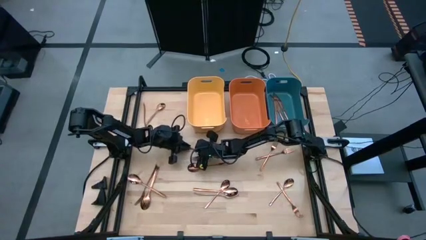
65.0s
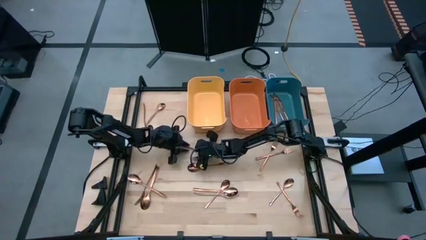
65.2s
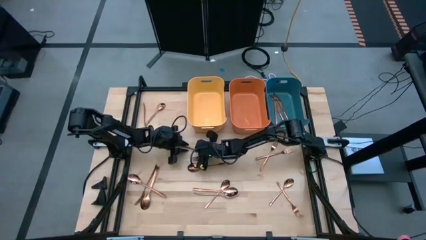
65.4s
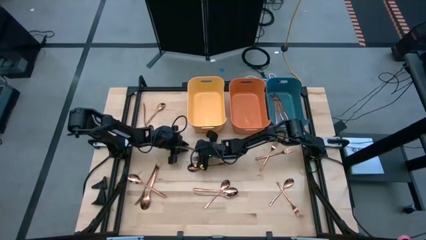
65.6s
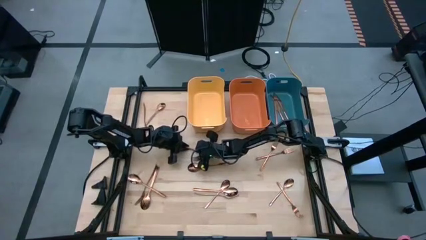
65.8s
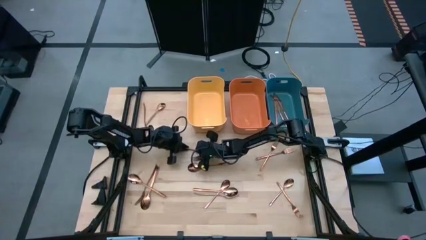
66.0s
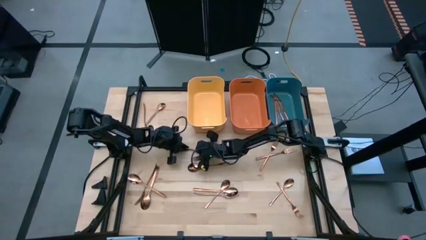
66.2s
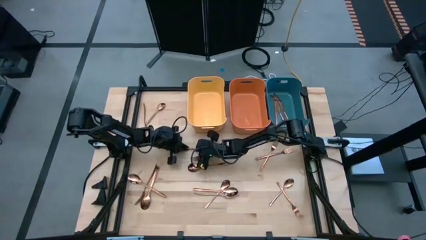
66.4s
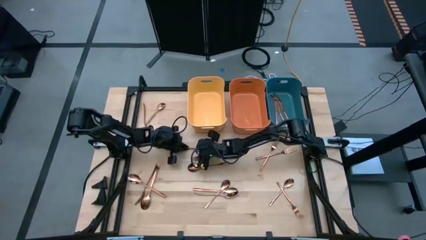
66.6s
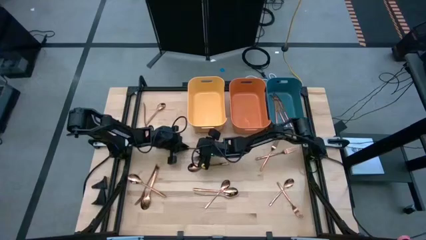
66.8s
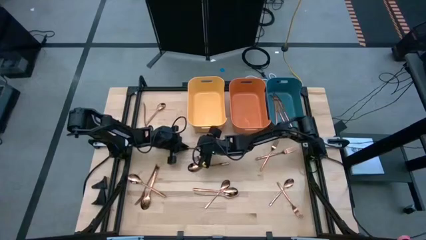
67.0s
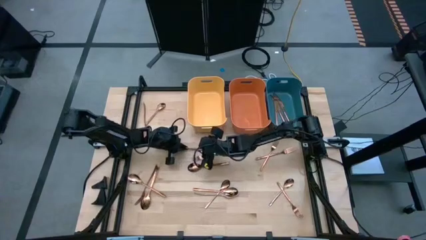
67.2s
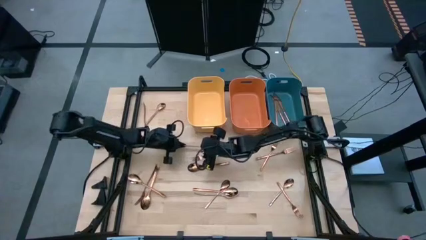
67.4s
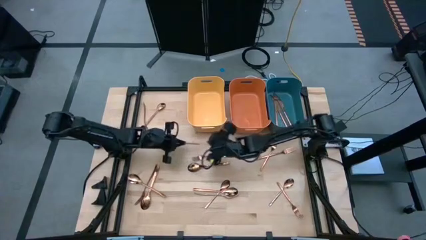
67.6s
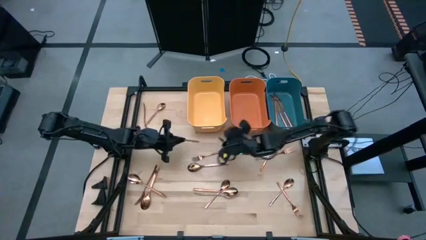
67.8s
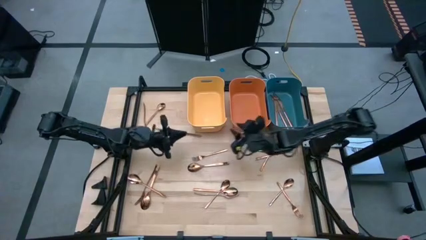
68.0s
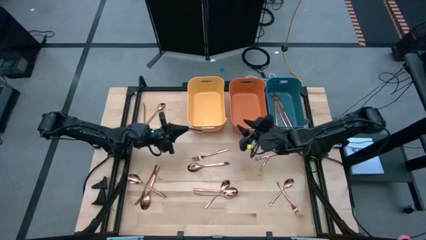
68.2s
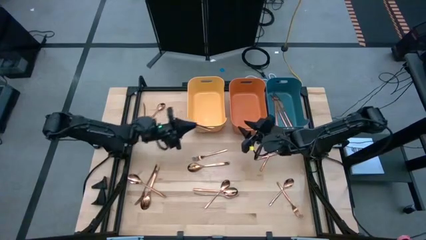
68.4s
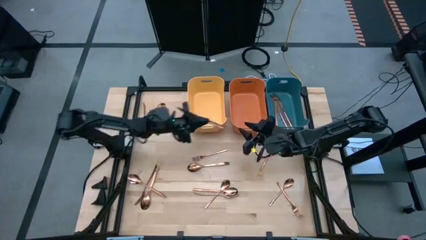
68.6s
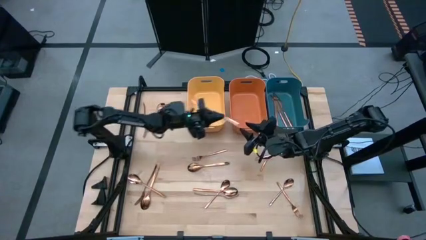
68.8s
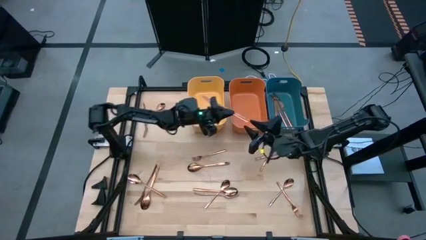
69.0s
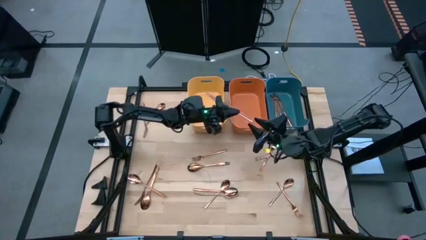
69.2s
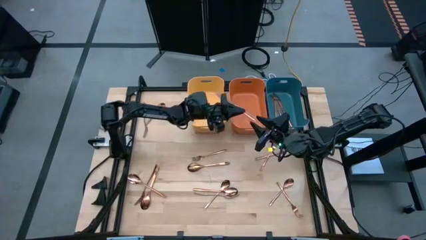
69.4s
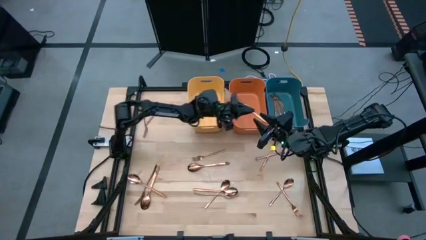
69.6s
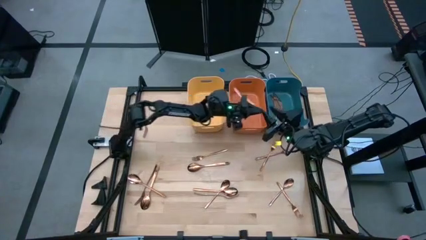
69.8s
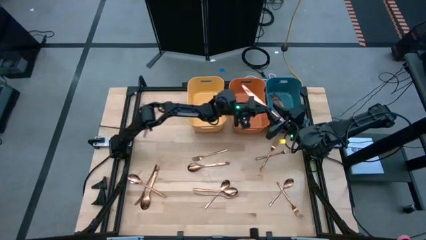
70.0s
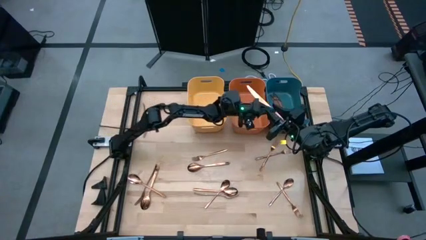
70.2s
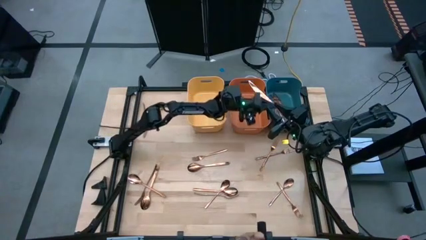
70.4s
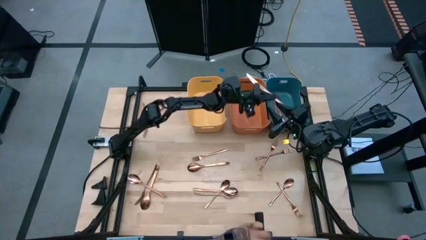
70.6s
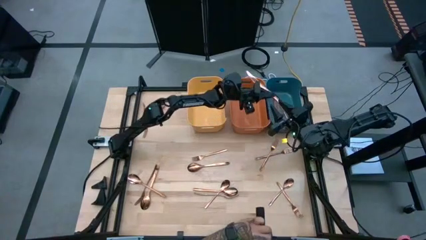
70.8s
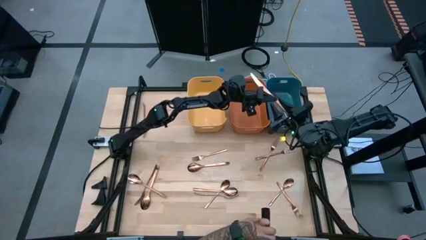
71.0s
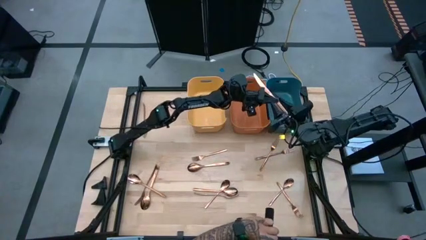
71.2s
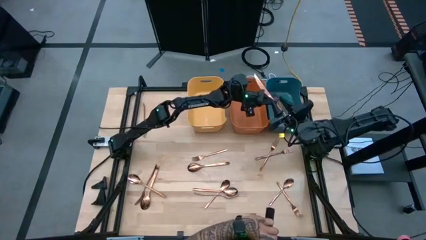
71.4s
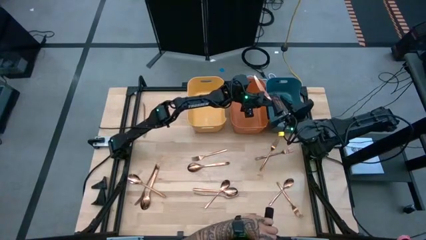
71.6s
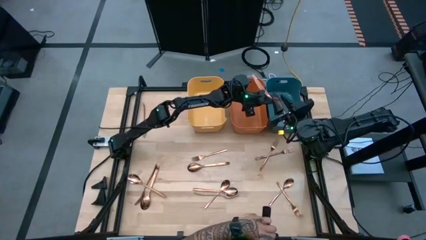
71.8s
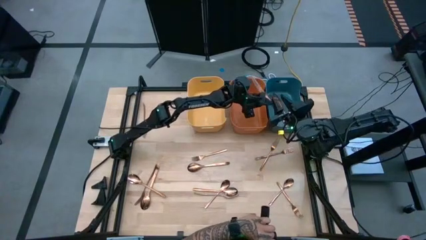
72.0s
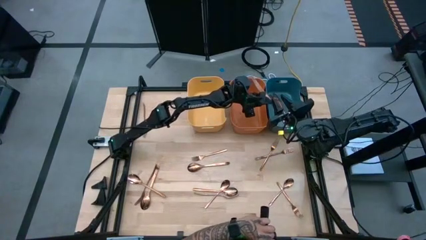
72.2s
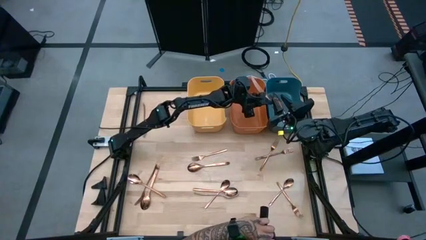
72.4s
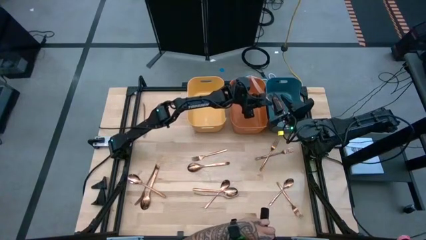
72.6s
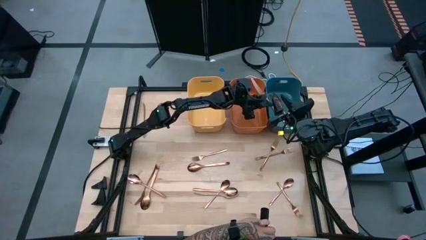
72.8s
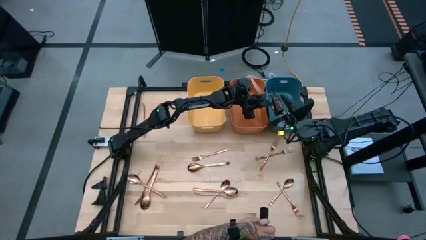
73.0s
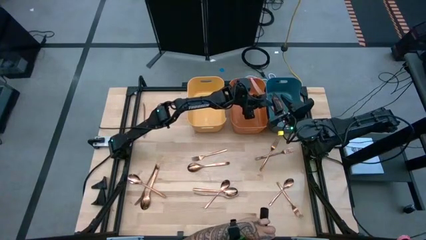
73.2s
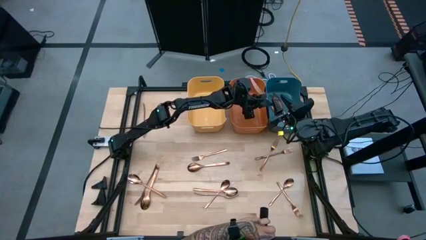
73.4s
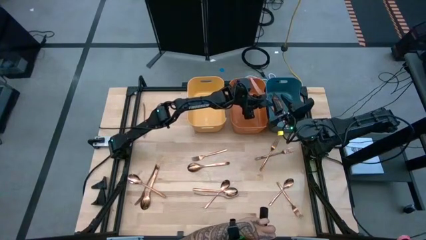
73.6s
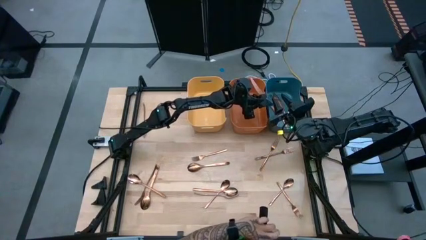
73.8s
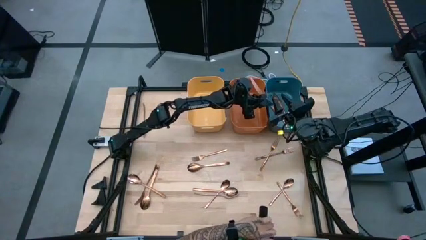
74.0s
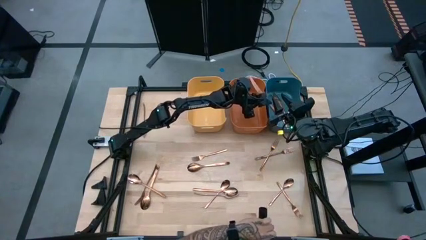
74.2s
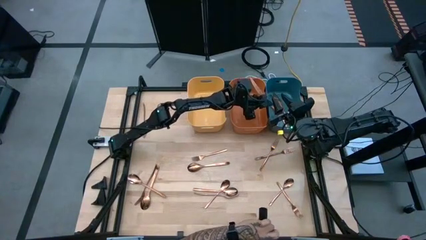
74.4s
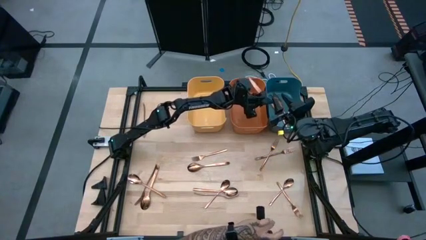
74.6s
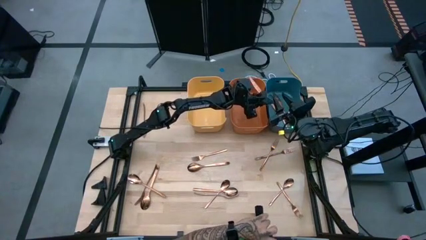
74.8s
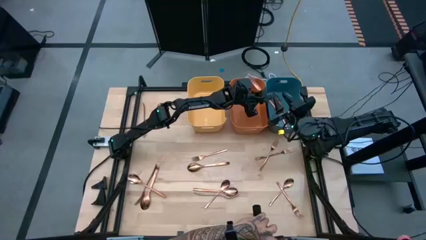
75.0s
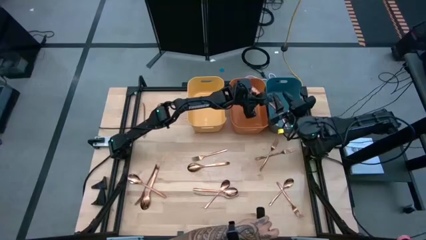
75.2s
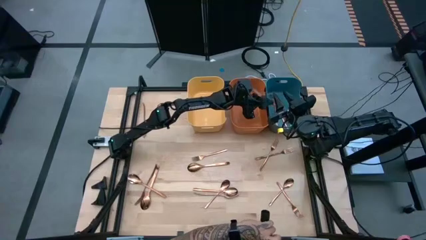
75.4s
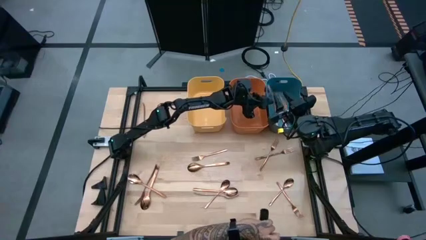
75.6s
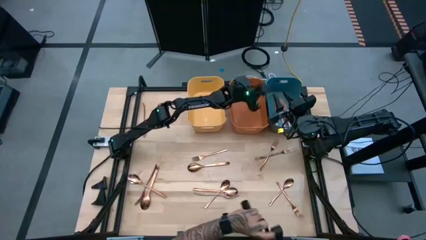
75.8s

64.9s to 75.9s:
Task: Sort silverware
Put the copper knife into the blue bin

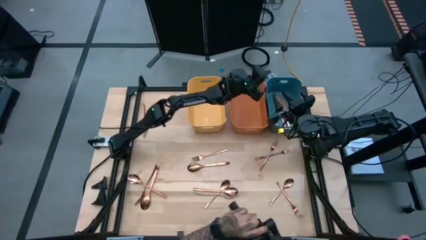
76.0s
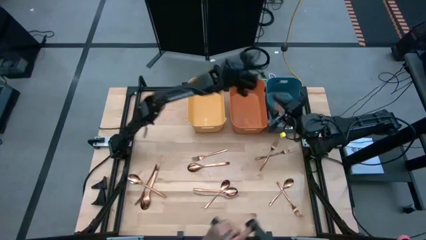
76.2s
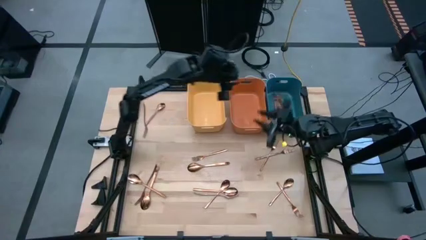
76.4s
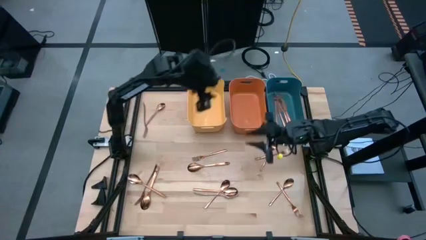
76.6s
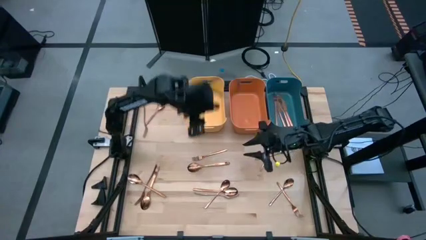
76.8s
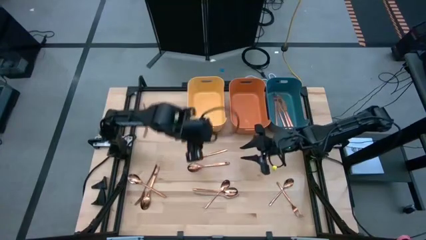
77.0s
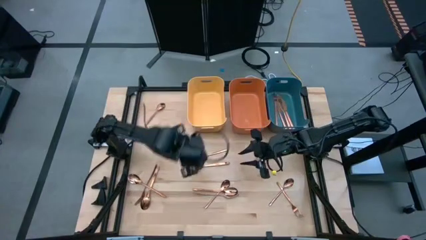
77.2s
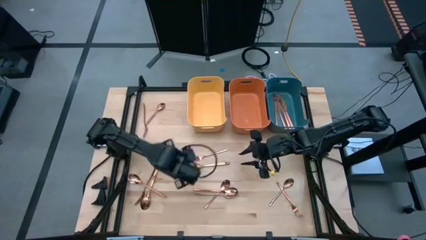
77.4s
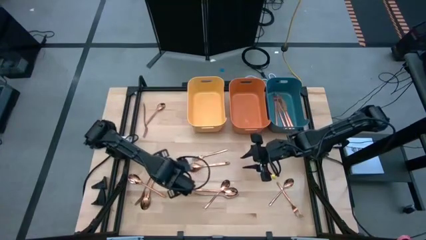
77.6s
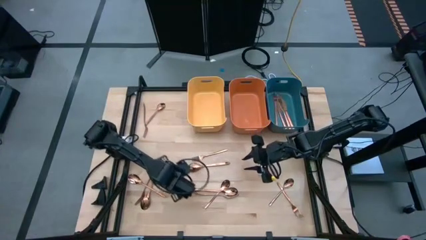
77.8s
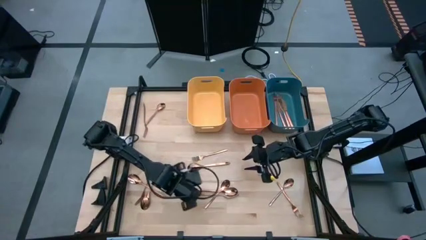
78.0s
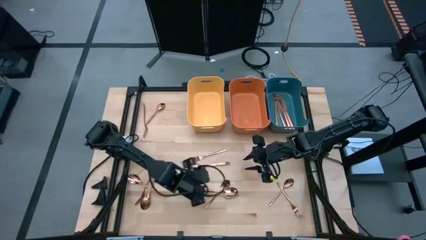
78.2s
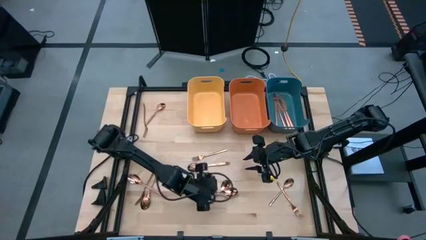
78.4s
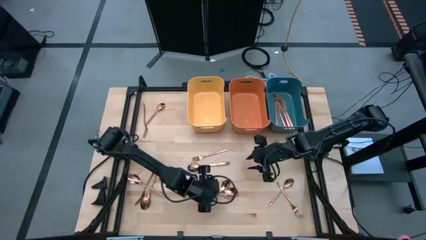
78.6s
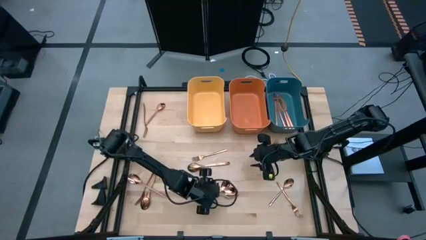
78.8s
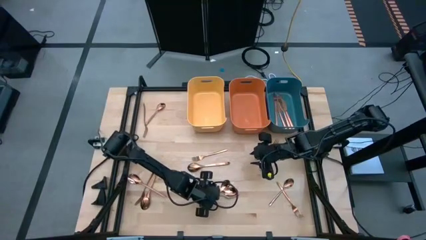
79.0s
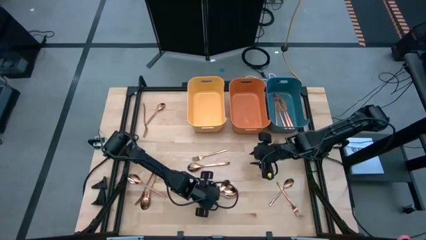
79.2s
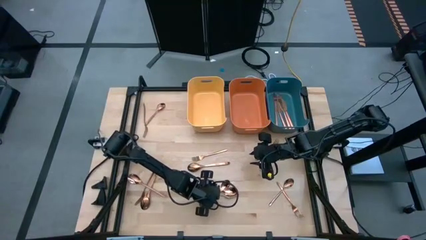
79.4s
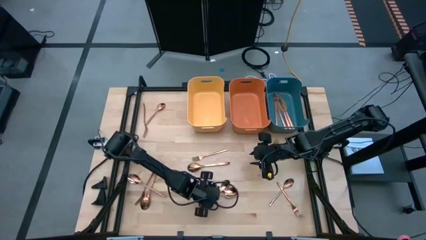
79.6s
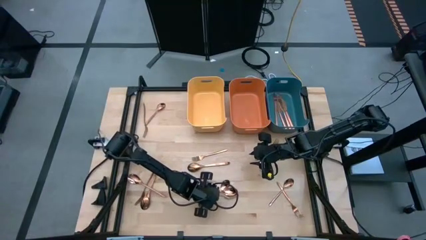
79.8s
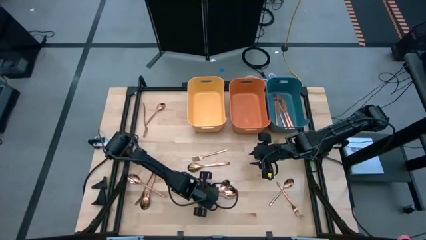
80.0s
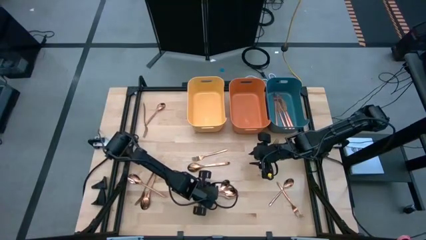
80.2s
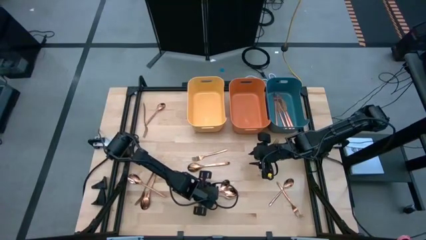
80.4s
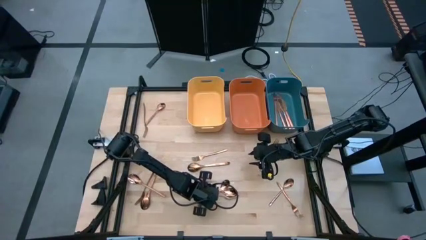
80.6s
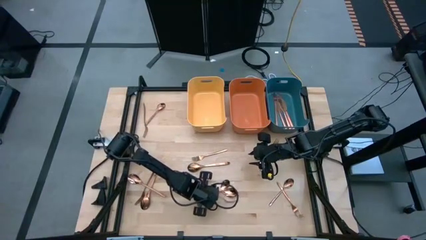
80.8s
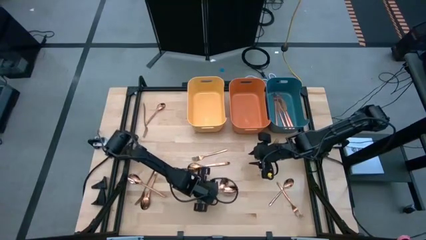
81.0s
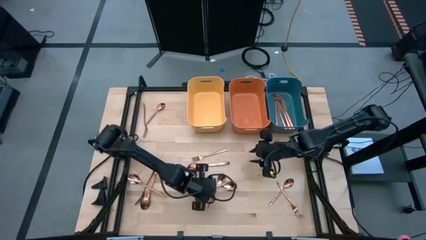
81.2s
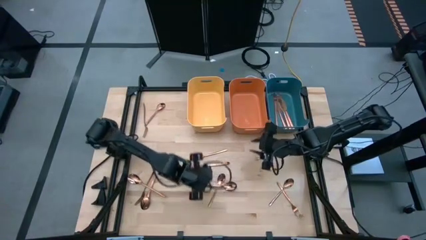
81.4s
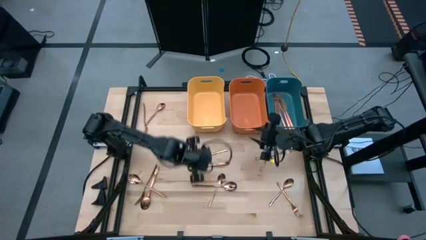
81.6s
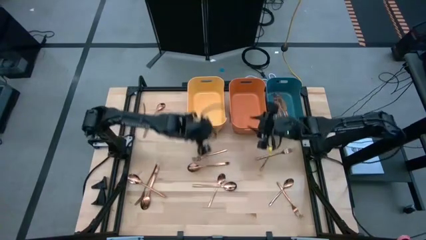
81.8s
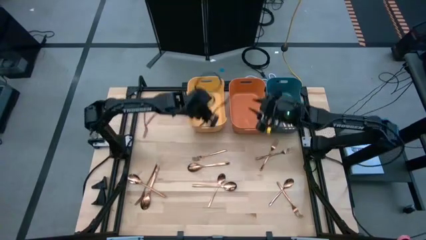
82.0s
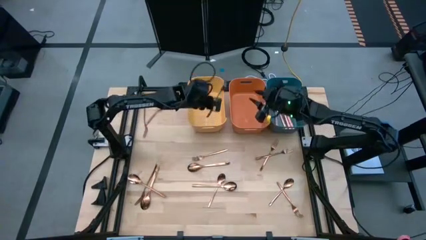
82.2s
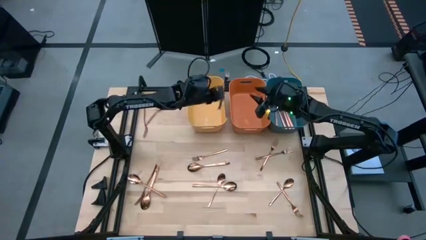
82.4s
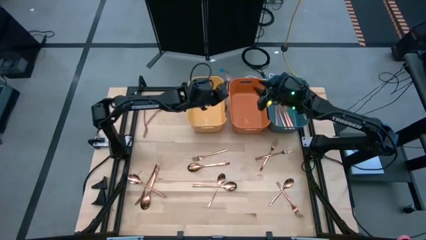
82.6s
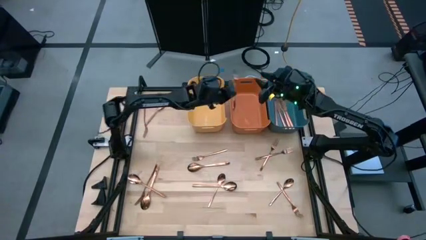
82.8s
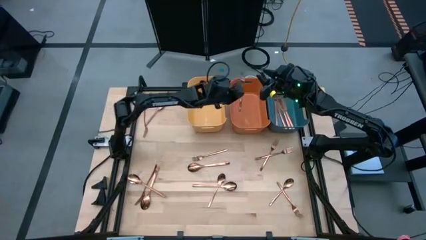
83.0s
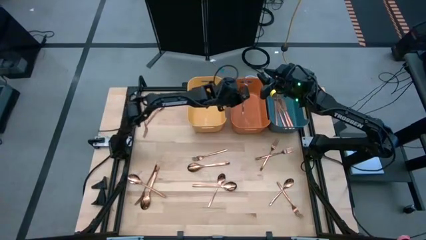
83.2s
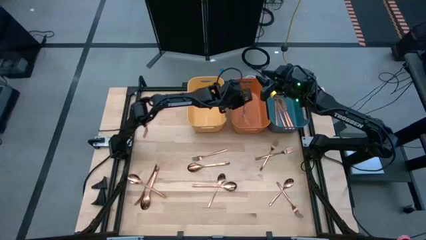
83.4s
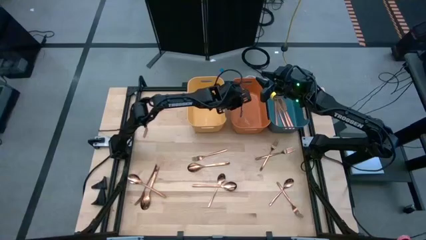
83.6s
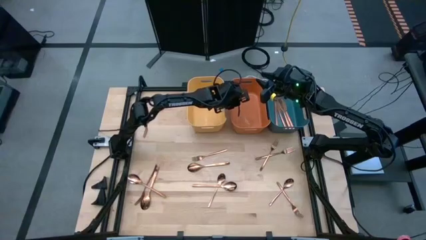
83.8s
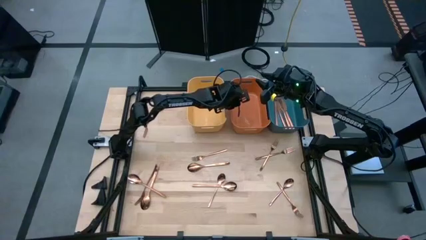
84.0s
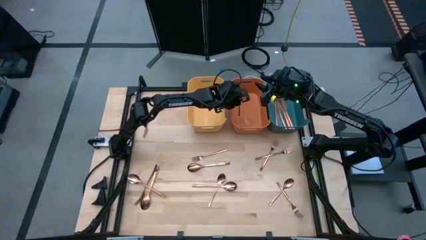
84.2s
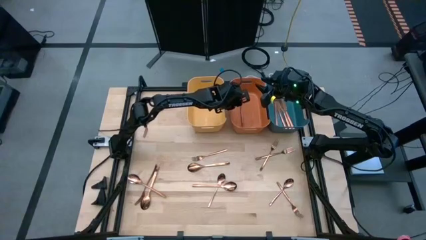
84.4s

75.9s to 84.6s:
Put the copper fork into the orange bin
